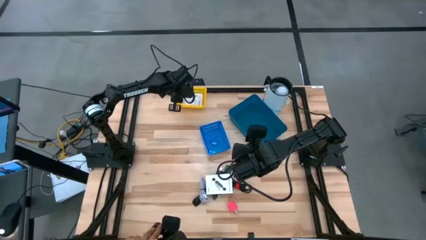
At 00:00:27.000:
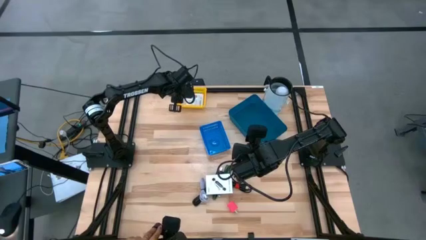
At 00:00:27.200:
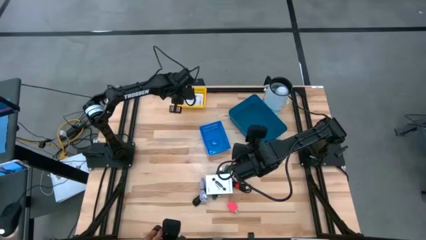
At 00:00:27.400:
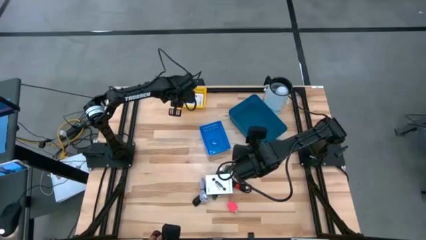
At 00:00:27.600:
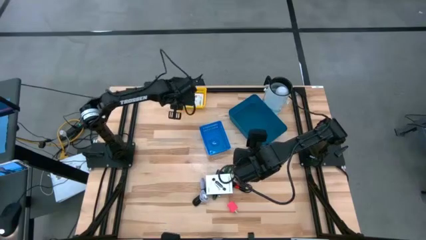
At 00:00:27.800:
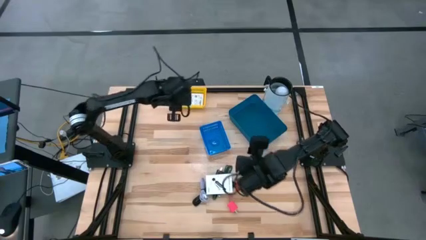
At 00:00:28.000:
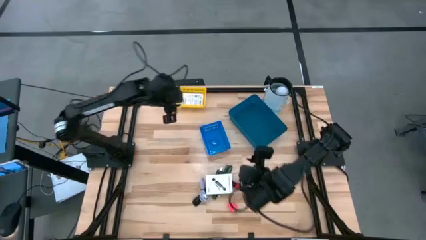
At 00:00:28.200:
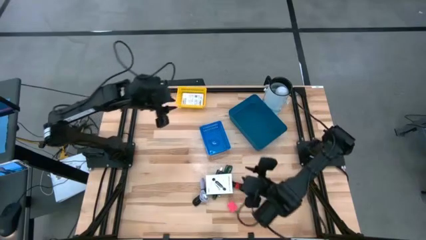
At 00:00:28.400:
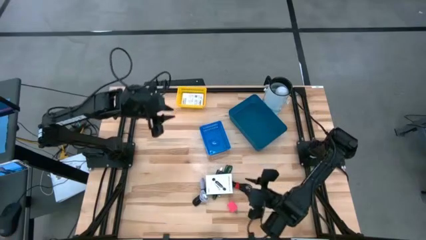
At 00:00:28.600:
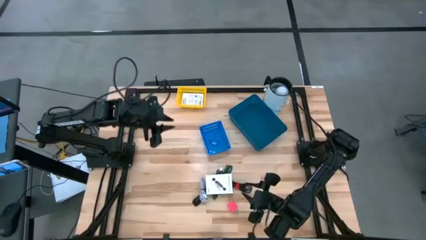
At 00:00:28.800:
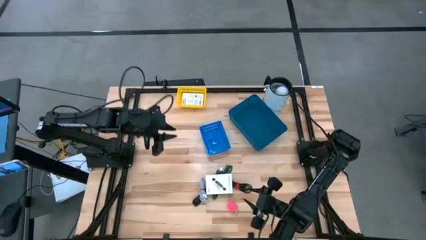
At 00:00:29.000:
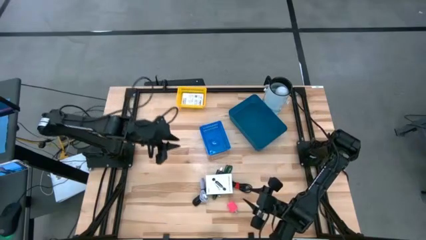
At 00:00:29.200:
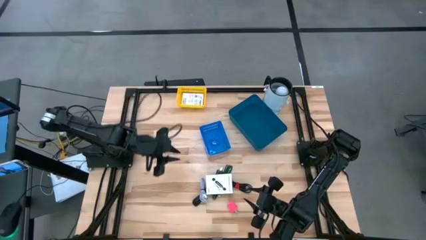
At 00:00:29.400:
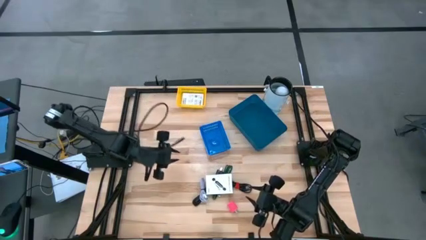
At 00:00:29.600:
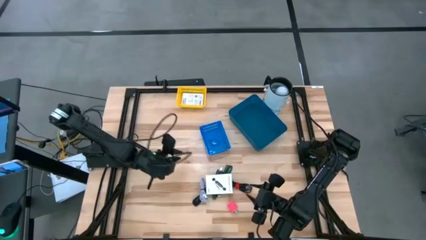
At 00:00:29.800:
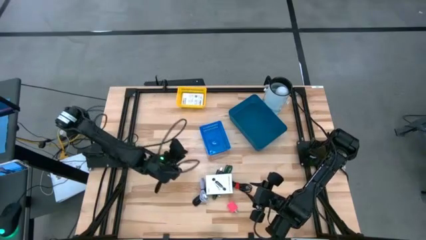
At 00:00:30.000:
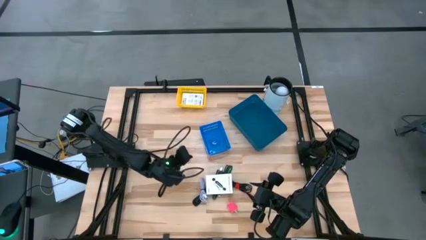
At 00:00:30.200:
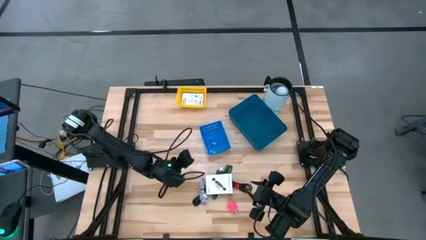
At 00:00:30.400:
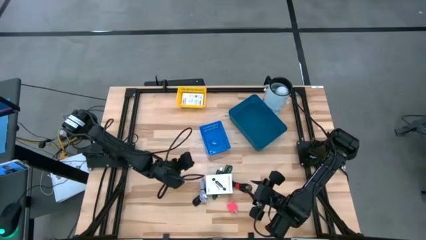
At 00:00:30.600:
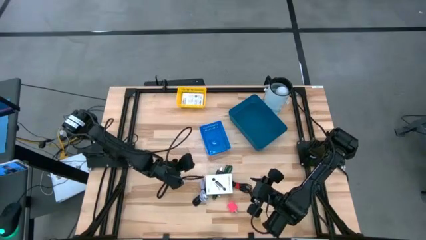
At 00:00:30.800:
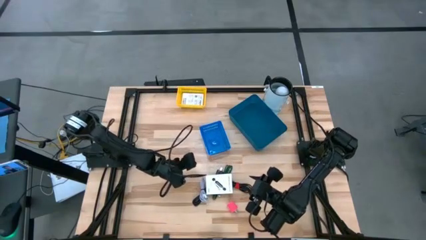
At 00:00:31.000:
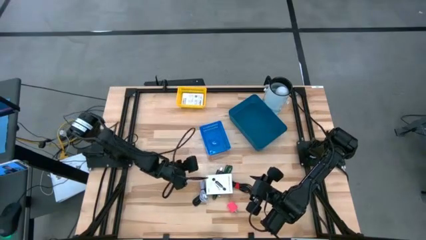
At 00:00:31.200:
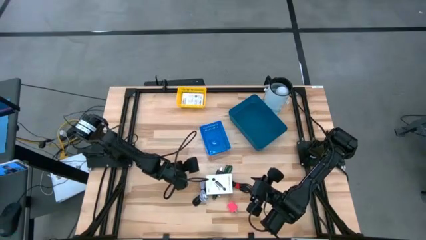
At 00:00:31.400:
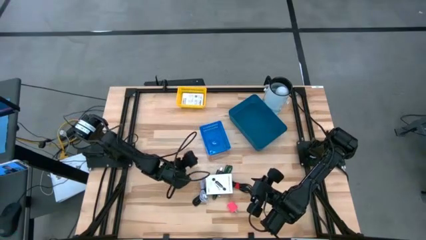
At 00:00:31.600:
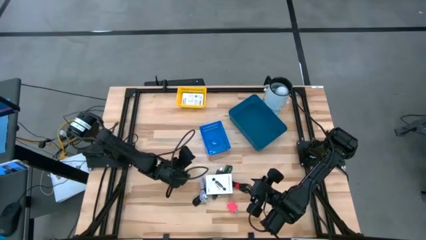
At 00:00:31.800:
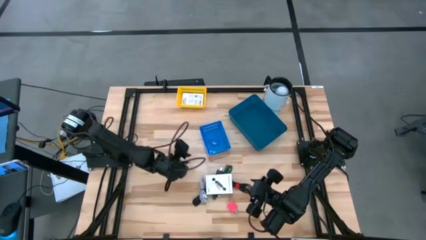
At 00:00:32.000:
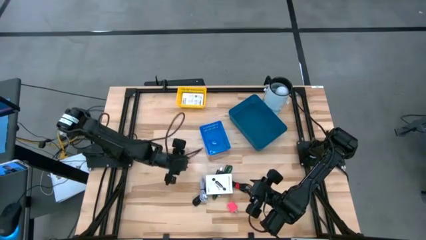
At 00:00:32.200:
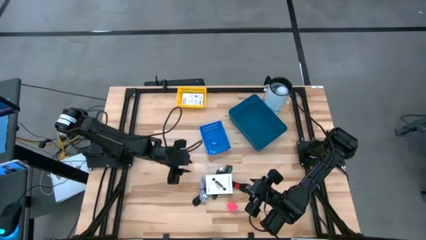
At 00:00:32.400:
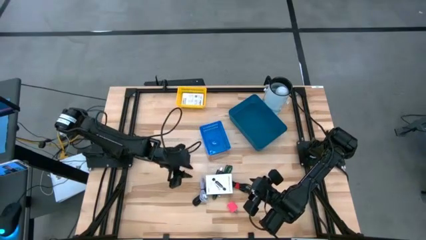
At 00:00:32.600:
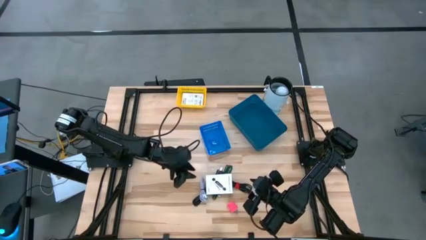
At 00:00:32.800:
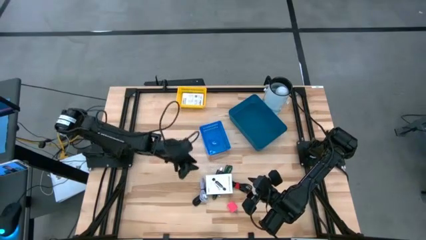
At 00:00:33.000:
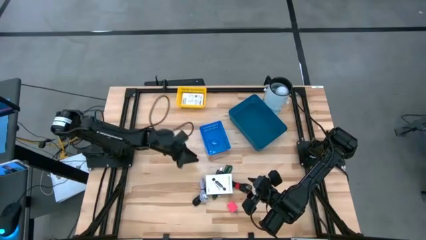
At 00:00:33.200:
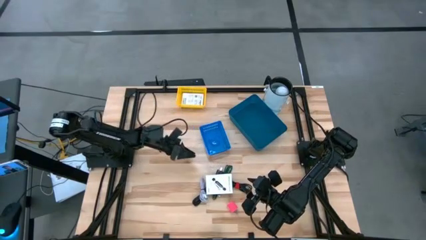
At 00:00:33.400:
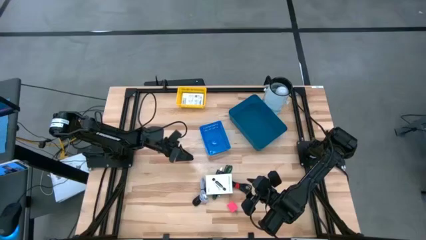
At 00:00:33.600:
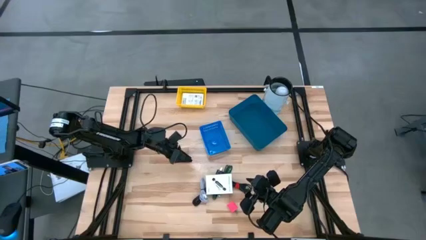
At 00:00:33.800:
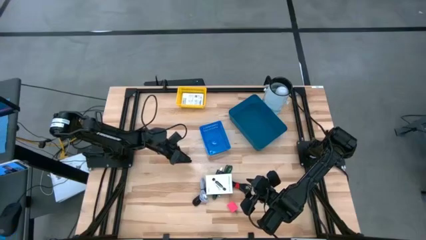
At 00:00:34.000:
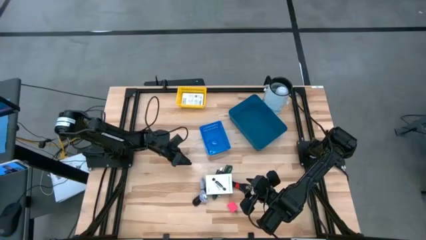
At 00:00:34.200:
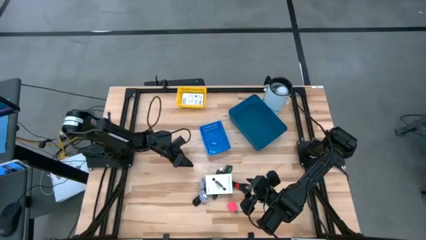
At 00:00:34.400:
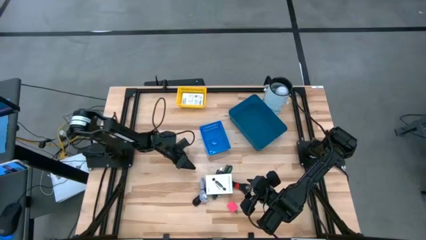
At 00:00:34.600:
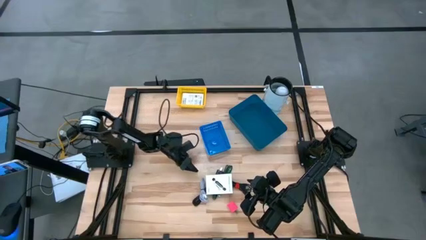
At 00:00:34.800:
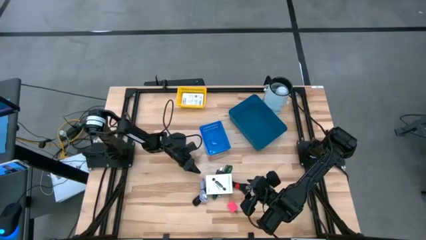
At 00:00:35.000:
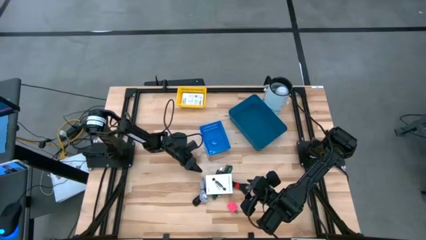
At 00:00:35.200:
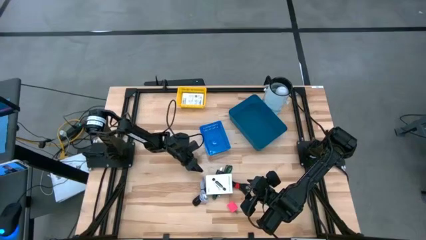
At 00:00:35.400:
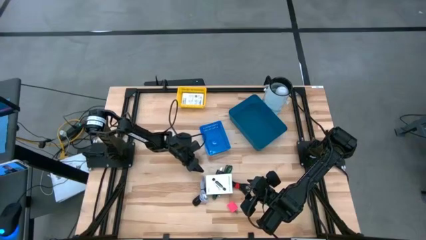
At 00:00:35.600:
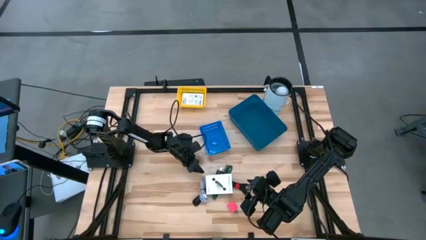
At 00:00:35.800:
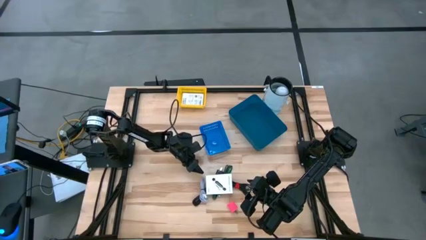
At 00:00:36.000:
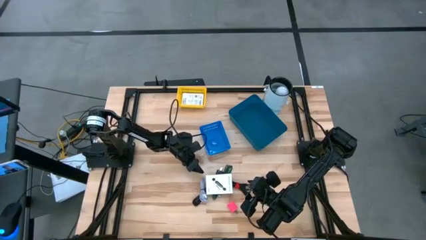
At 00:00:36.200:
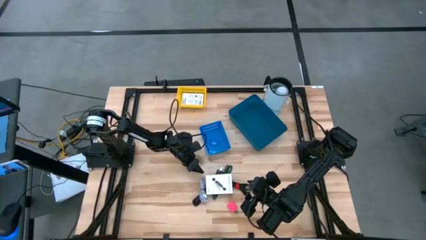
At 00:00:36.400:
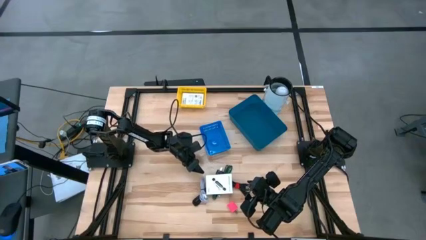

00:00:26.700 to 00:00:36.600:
Task: Pick and place items into bin
Put the white card reader box into the yellow bin

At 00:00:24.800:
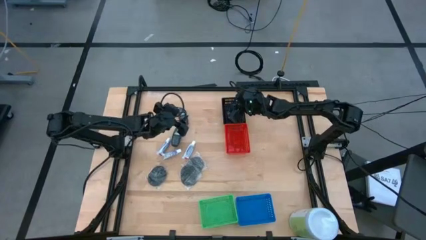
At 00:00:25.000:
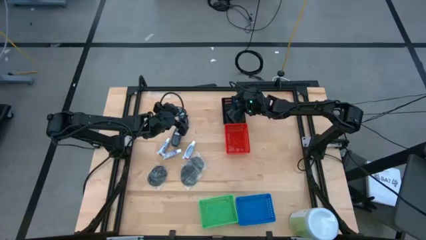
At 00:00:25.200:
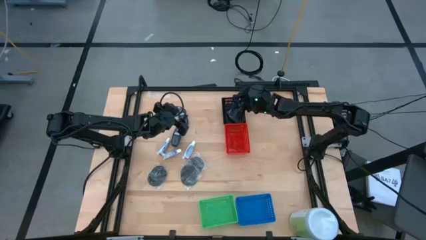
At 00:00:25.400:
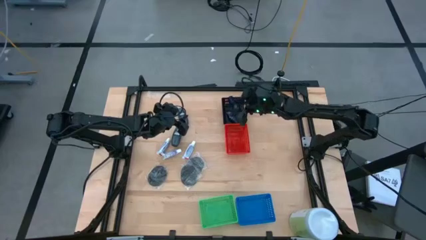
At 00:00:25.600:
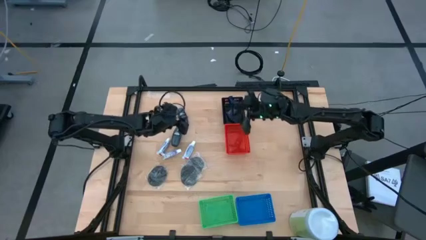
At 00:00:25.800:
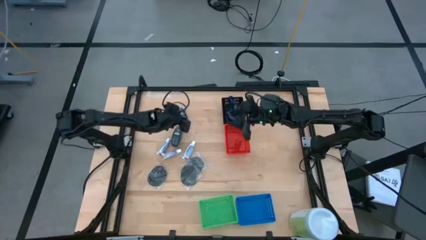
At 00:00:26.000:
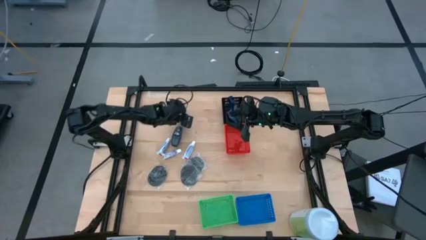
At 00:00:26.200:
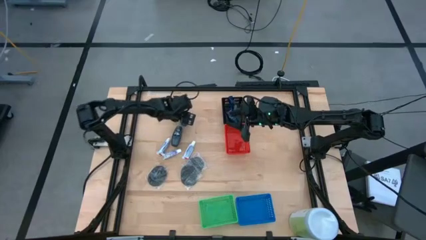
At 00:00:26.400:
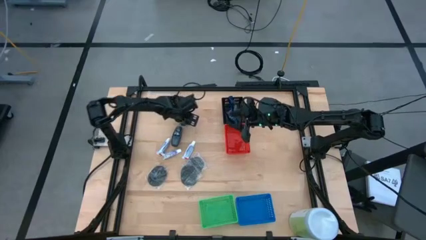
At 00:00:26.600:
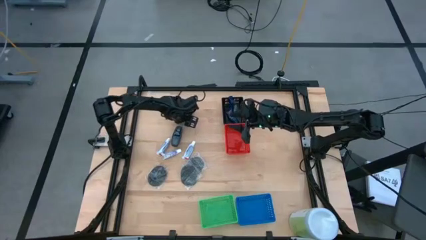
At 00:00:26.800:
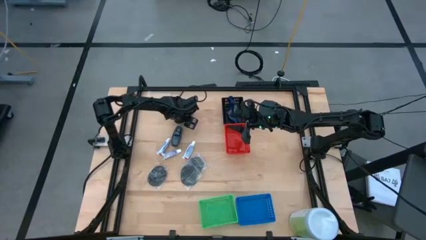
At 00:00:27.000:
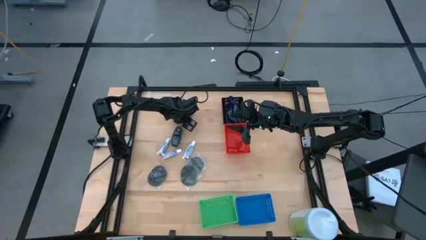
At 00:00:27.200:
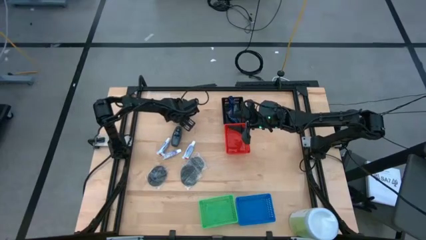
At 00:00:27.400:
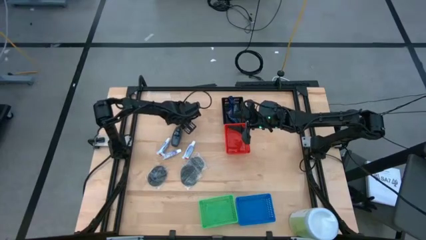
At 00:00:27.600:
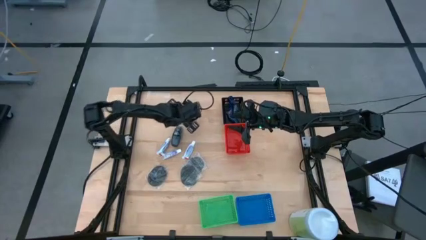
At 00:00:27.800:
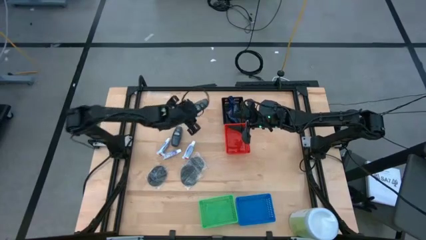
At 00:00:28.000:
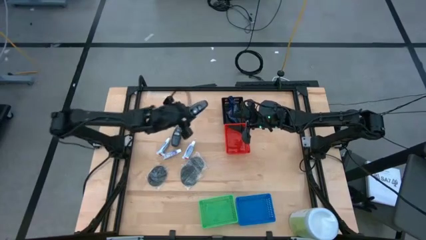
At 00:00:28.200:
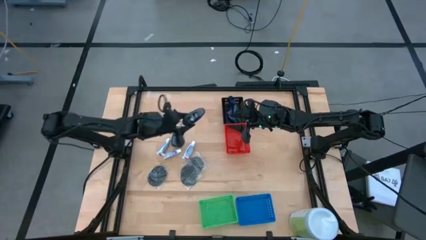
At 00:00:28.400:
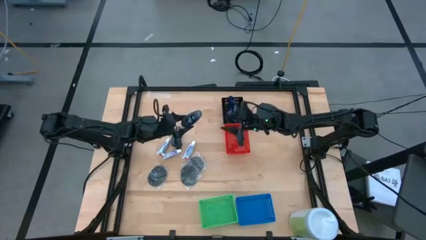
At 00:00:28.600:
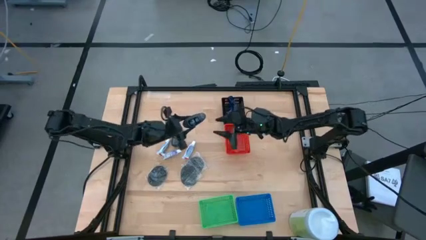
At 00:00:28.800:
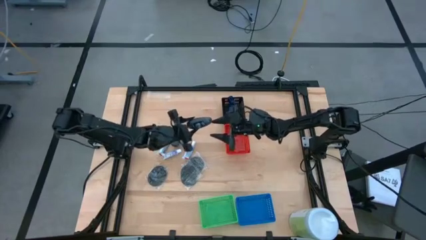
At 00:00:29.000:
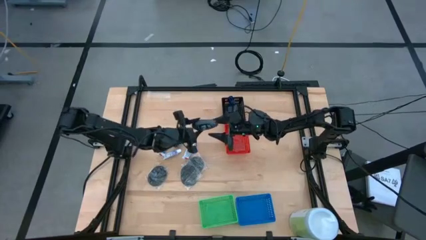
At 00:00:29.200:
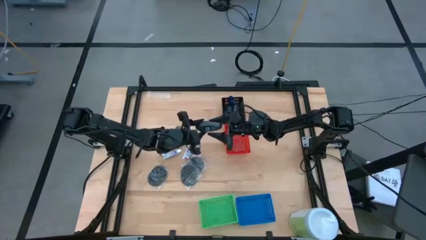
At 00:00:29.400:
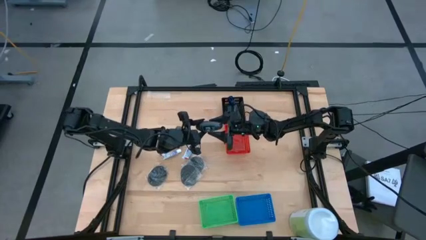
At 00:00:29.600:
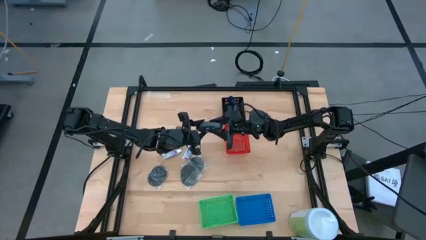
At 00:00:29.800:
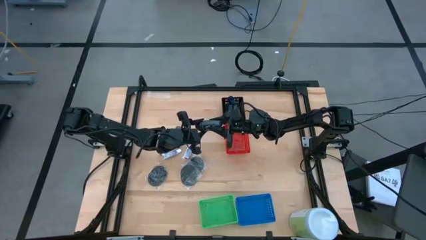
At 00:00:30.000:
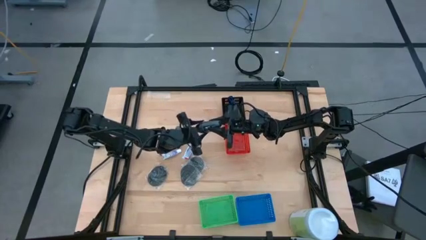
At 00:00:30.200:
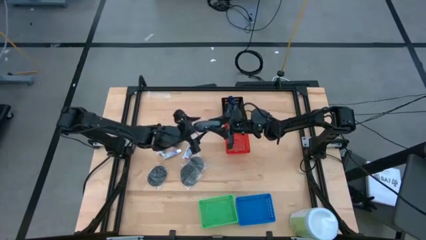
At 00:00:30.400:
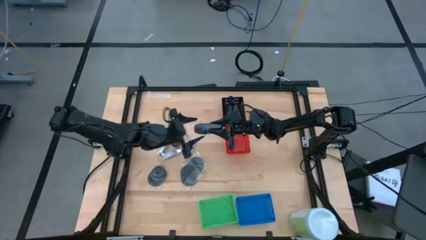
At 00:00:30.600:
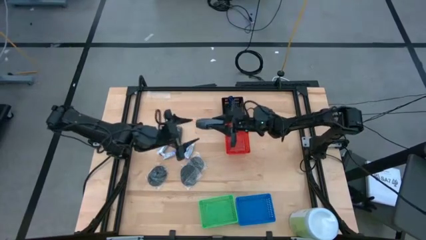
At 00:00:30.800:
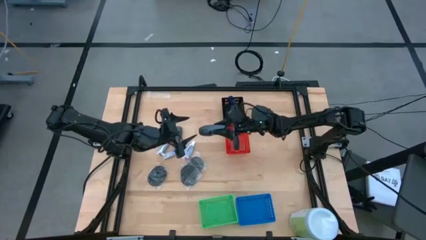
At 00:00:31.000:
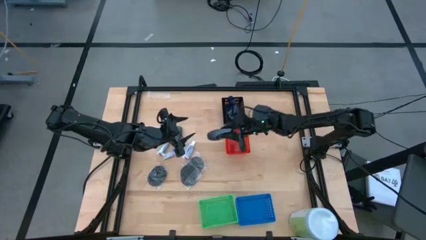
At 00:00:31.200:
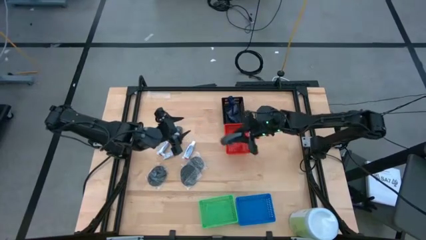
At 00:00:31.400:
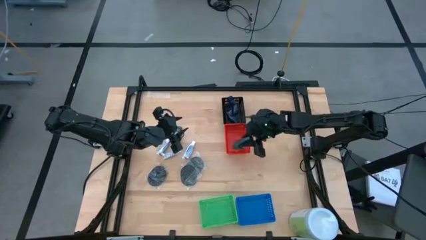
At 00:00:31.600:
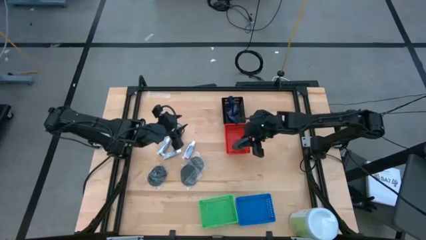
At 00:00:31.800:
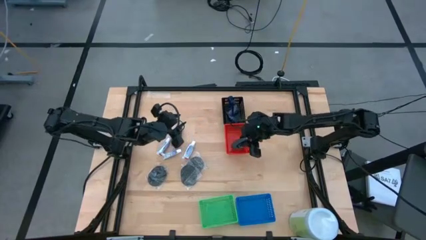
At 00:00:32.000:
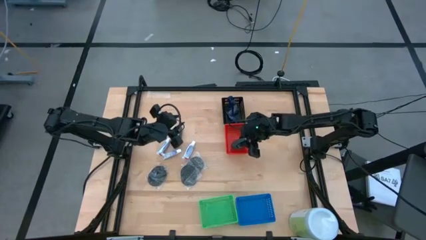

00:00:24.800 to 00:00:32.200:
Task: Pick & Place Travel size toiletries
Put the top gray deodorant into the red bin
